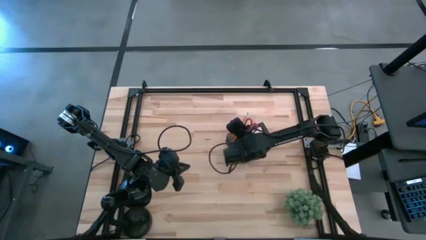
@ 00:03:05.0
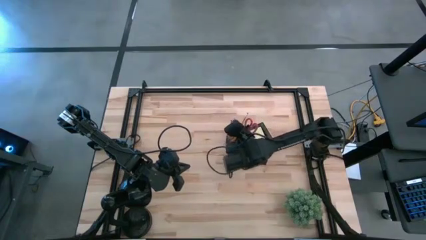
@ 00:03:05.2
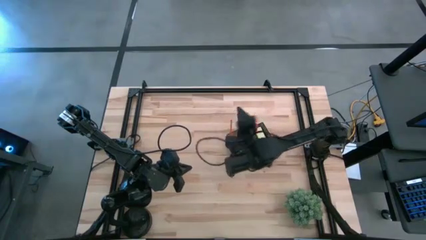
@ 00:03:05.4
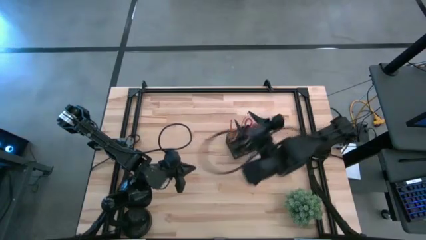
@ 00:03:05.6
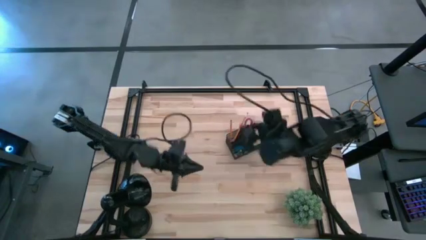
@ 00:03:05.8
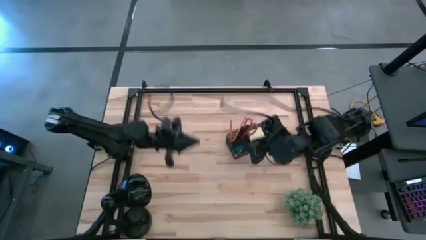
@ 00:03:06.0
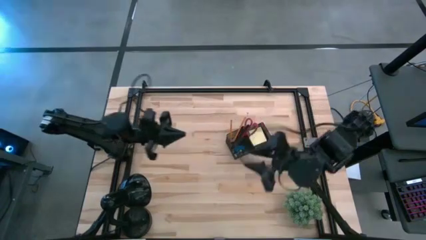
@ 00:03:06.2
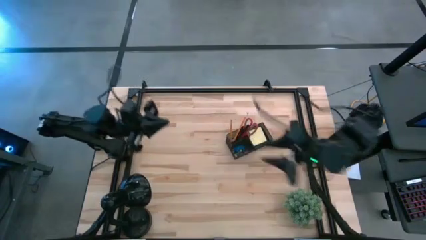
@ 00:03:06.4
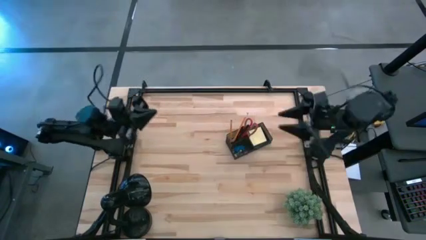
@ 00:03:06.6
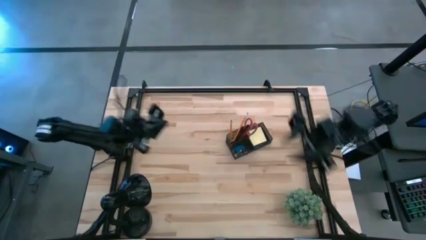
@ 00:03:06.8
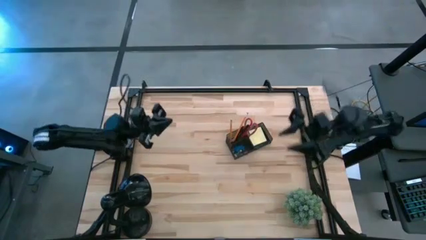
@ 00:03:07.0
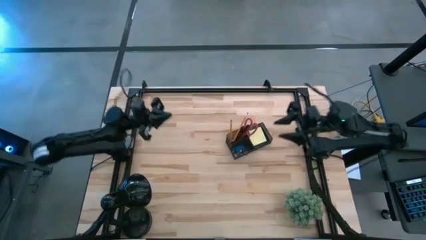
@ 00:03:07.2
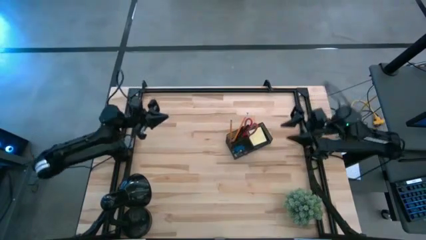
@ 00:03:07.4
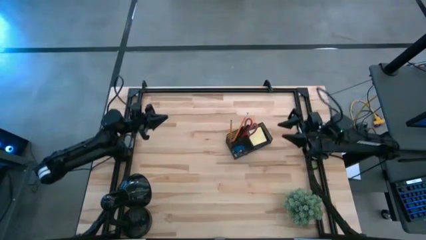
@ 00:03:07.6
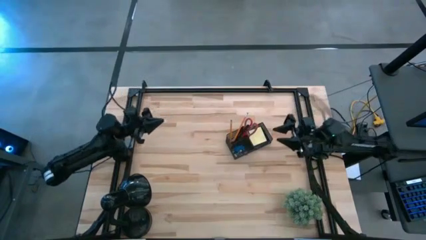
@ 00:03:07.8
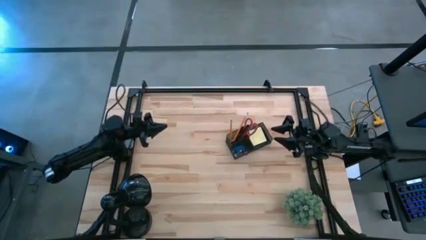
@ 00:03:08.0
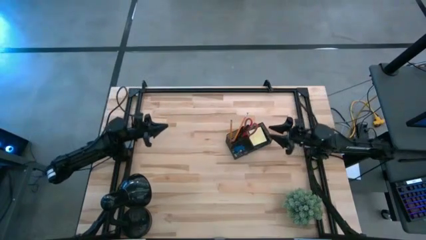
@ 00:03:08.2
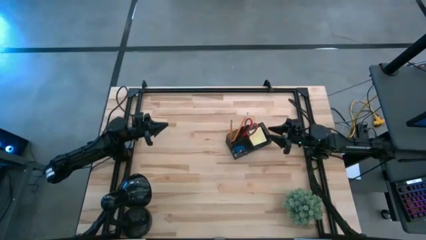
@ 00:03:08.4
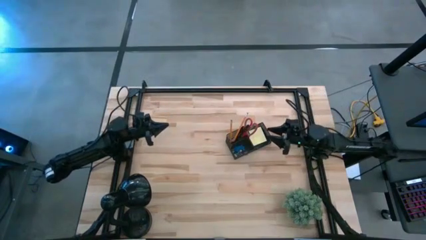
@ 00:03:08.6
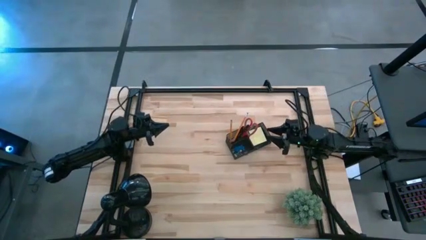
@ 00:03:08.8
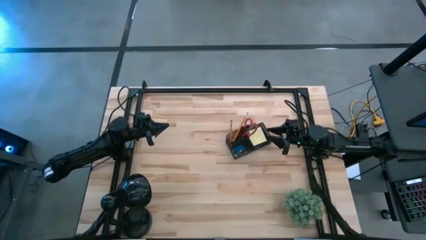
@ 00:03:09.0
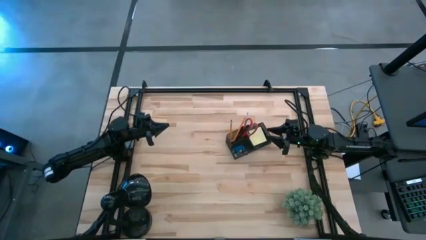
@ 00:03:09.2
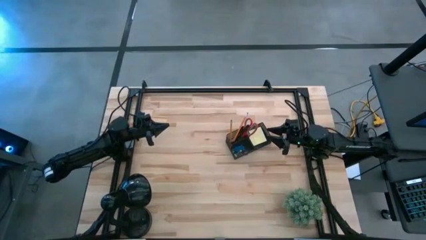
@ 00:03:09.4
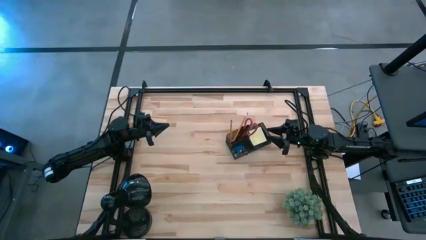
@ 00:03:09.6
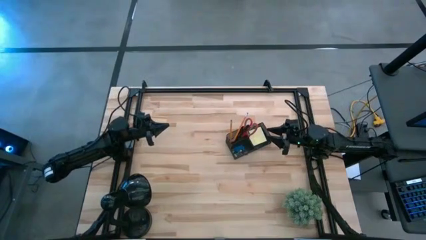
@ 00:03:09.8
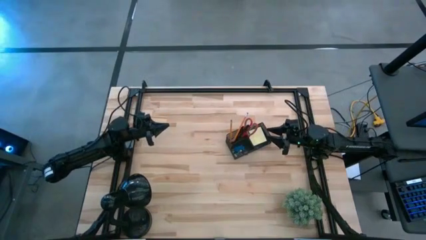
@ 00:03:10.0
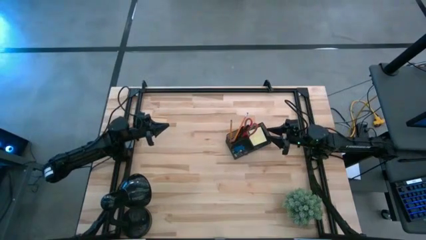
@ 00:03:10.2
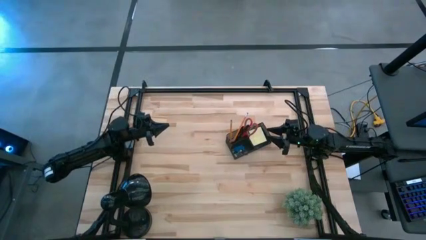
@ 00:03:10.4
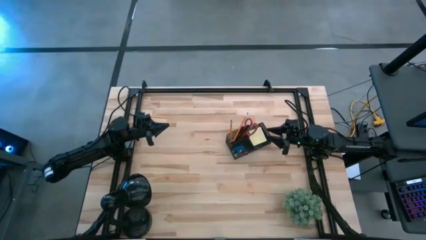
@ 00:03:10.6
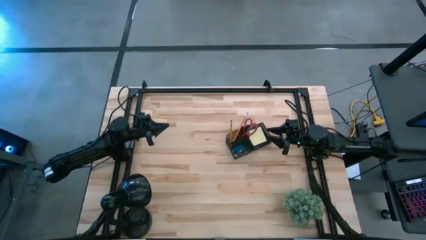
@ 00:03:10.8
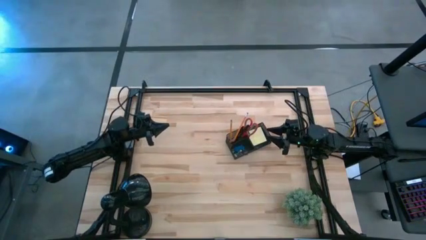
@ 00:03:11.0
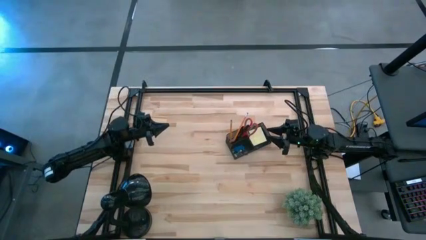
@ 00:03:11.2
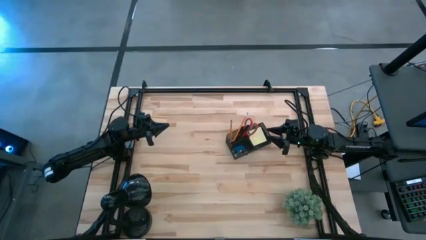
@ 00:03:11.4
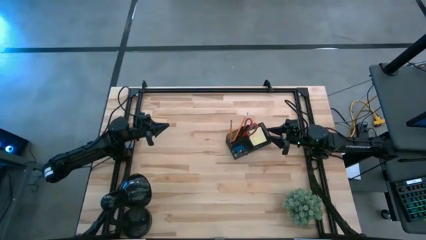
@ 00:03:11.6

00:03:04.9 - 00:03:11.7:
Task: Pick and place office supplies into organizer
Return to Home Position

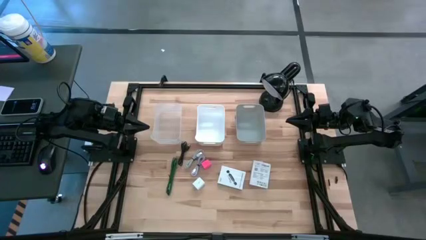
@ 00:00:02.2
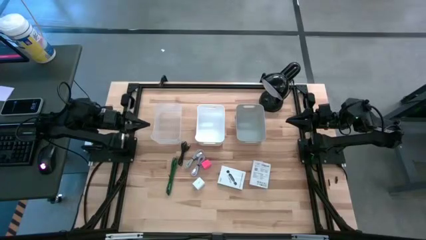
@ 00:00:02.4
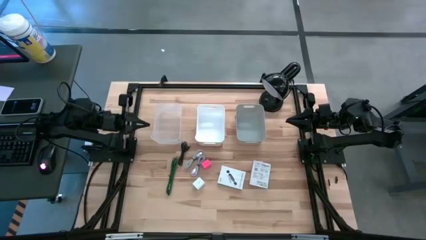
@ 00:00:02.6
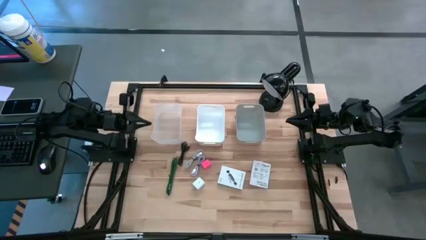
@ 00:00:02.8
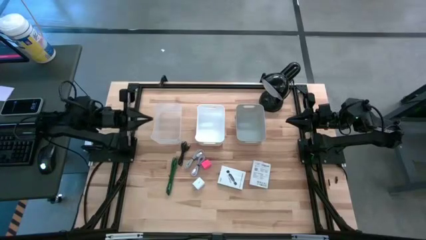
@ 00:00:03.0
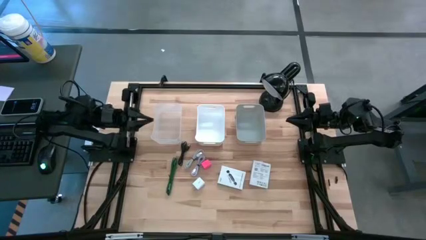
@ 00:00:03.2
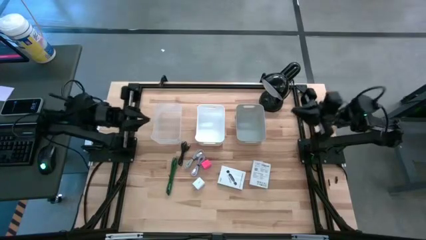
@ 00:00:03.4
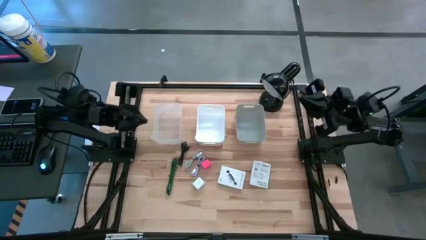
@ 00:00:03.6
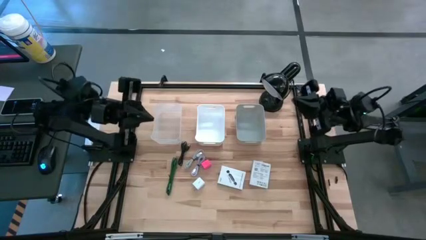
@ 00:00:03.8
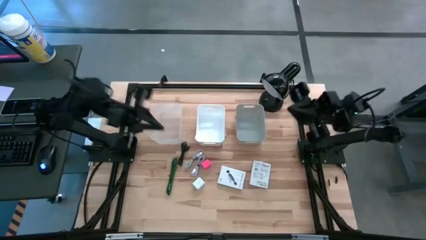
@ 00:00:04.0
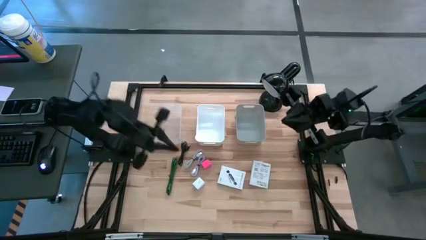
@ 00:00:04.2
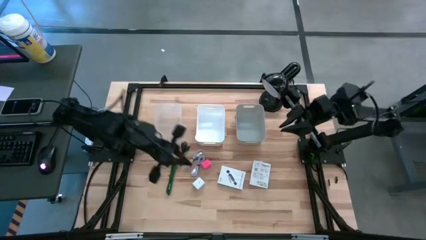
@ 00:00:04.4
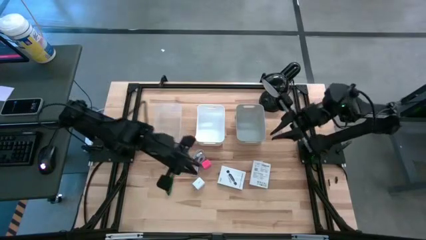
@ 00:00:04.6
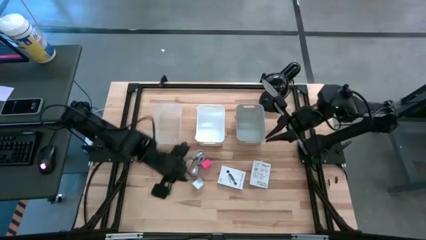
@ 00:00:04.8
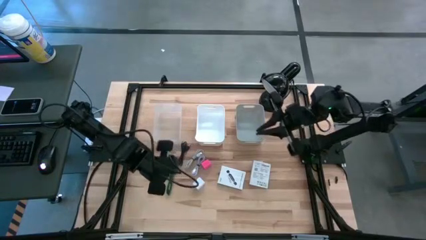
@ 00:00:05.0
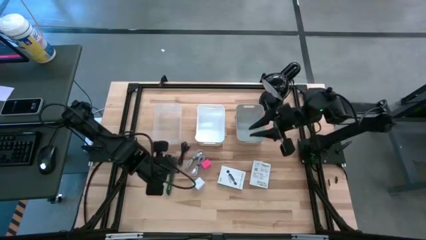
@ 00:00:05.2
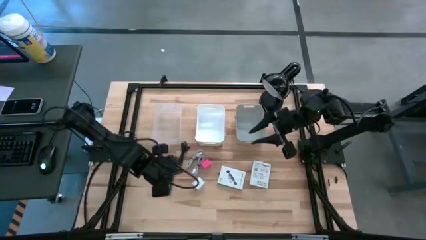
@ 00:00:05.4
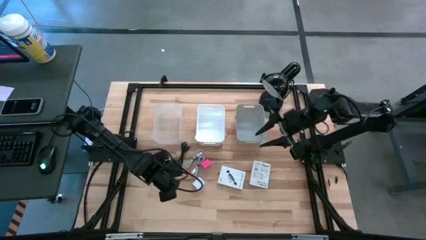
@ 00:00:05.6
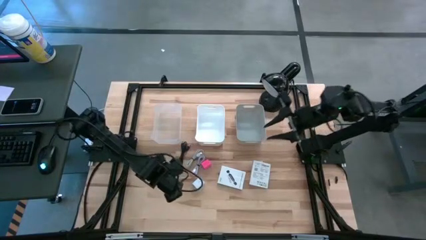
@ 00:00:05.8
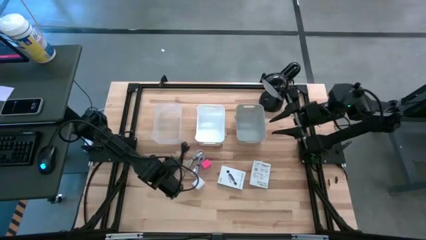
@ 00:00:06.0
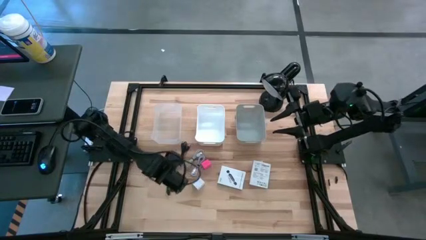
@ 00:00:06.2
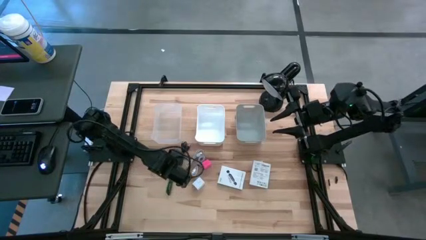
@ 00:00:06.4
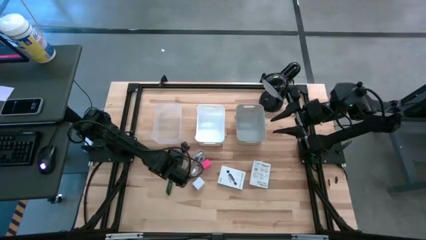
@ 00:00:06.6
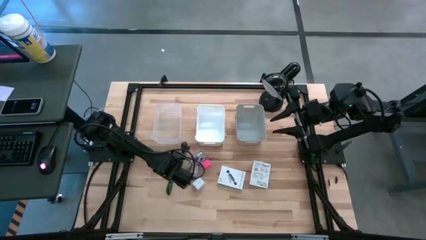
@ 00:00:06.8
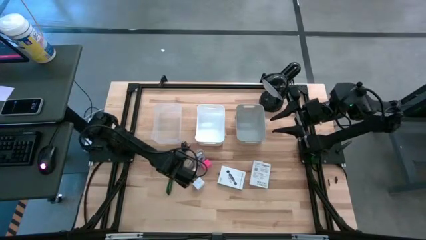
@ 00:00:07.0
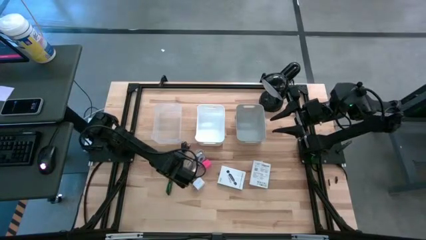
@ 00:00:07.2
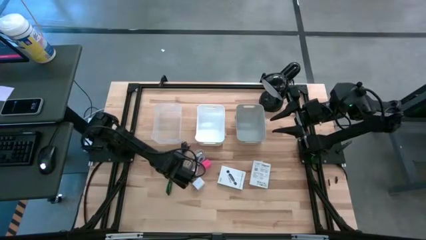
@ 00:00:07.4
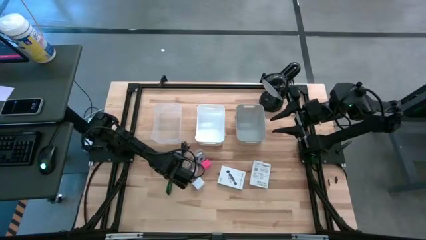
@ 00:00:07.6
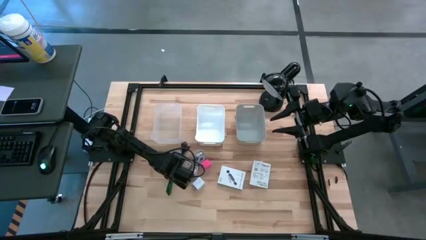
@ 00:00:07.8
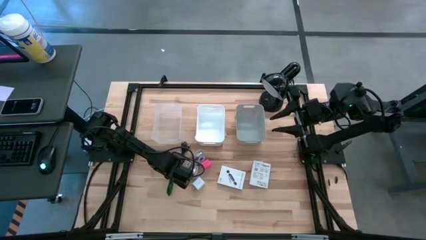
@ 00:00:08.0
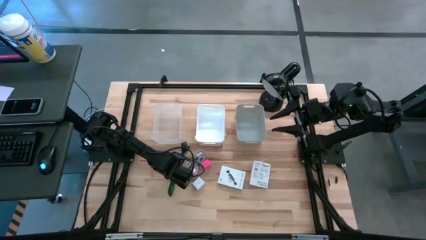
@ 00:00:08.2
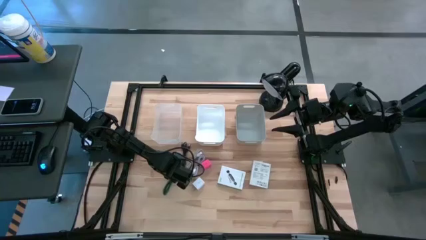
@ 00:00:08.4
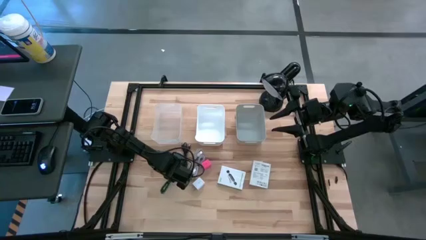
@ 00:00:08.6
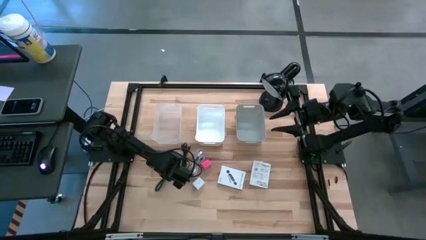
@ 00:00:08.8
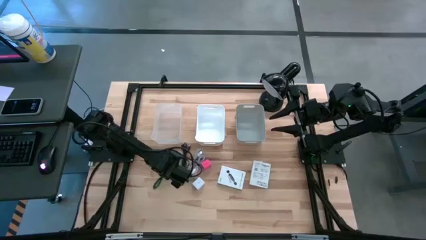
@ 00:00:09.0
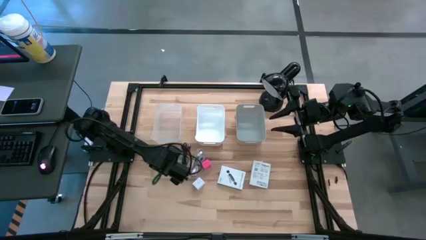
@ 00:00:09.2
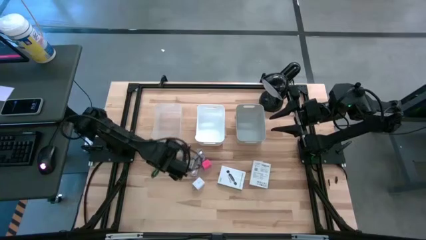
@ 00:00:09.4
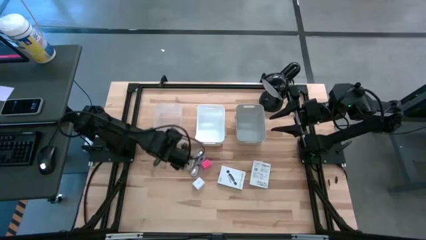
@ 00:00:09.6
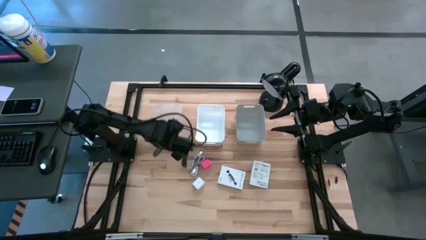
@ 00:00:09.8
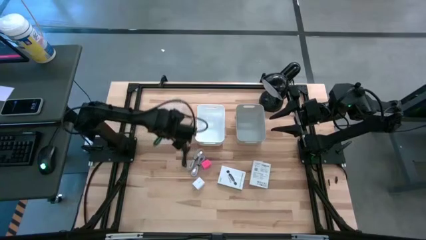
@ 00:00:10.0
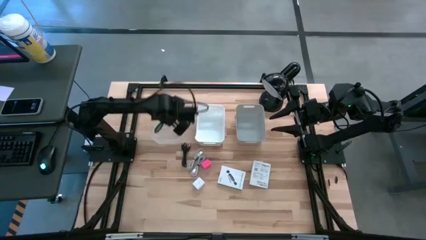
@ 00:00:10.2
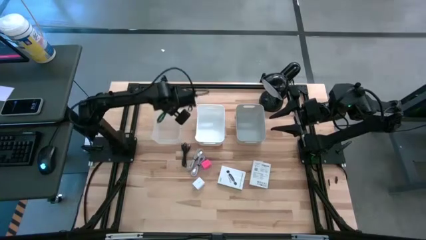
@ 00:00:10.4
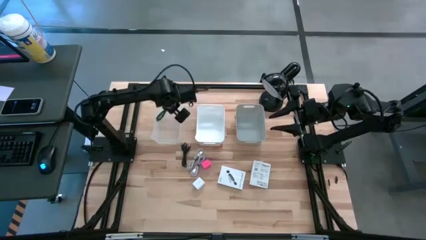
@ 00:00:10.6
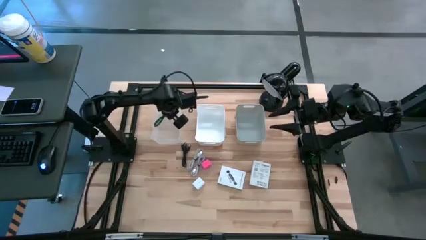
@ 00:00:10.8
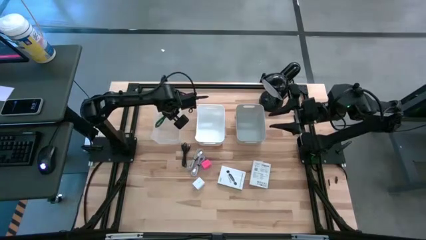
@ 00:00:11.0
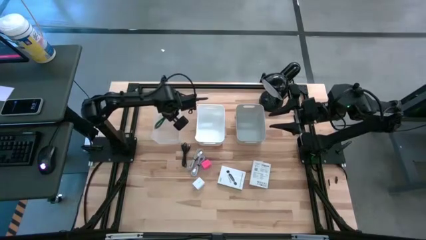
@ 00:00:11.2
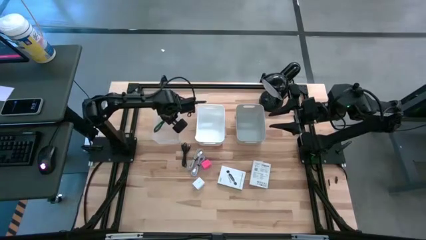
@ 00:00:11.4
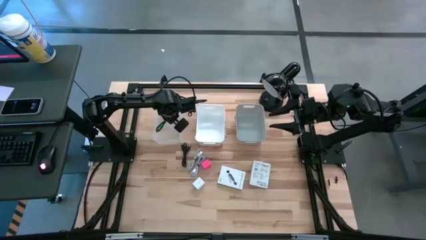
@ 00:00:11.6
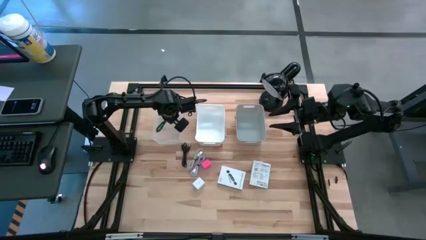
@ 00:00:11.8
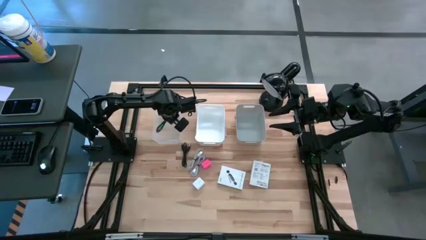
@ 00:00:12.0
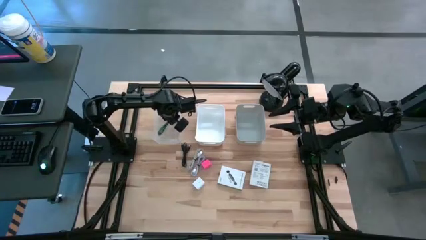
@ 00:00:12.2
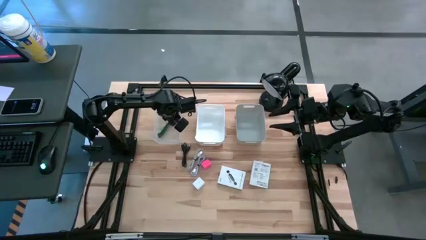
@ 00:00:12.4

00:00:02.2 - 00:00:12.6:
Task: Pick and place items into bin
Put the green USB cord into the transparent bin
